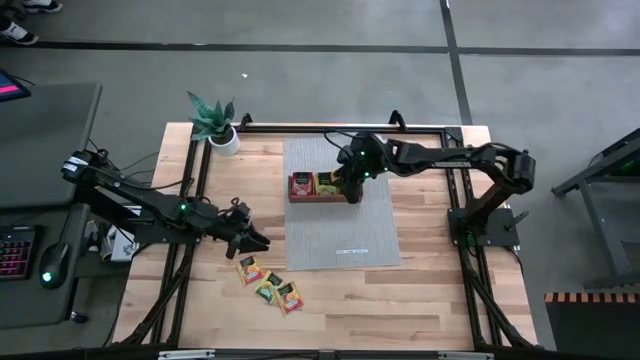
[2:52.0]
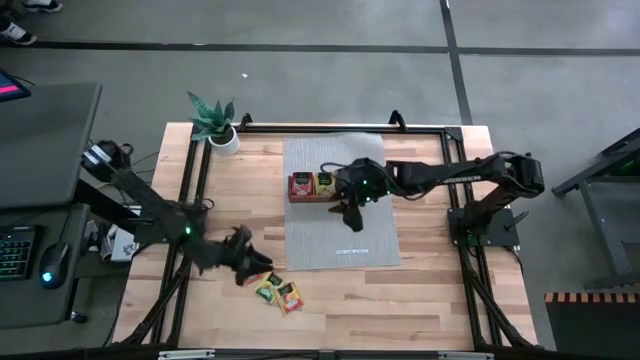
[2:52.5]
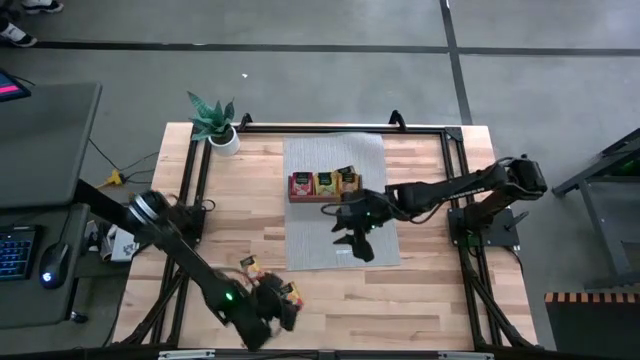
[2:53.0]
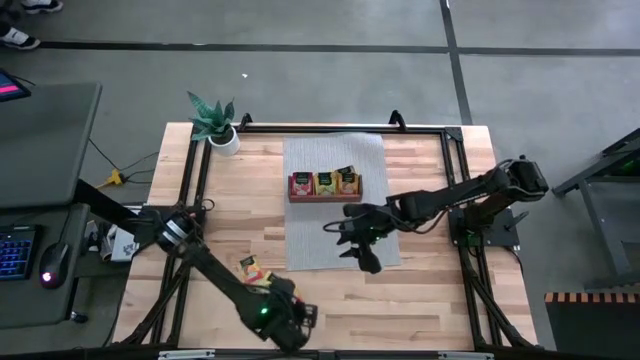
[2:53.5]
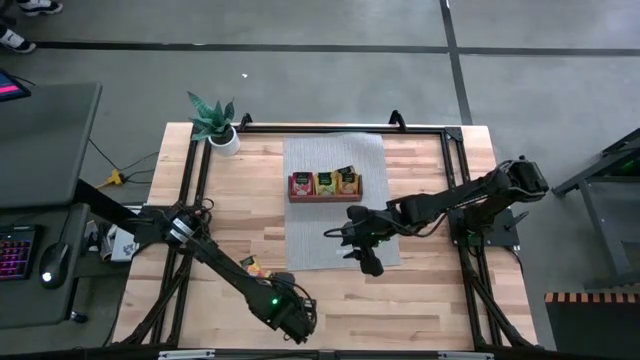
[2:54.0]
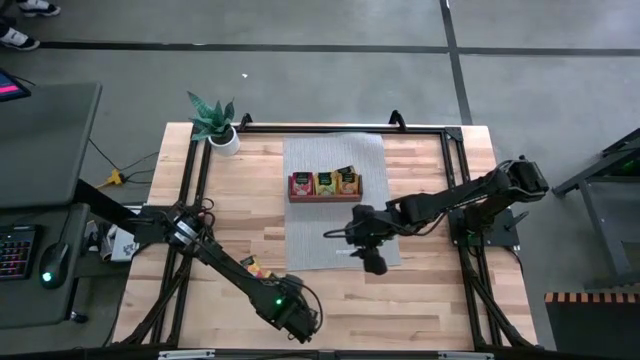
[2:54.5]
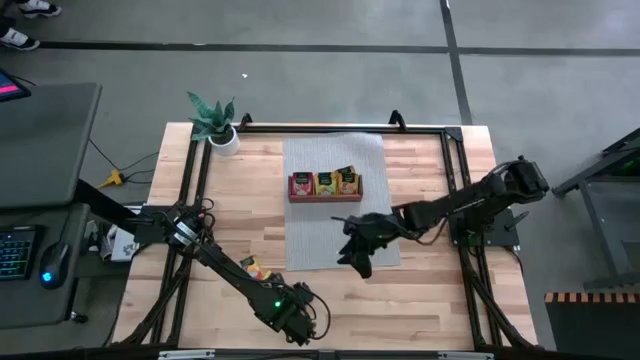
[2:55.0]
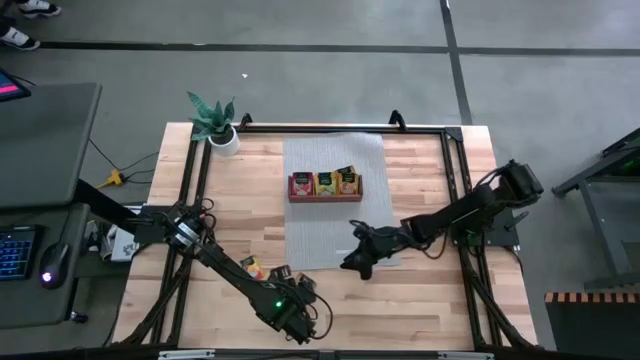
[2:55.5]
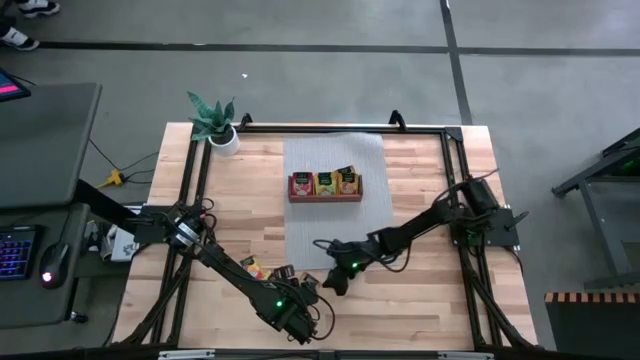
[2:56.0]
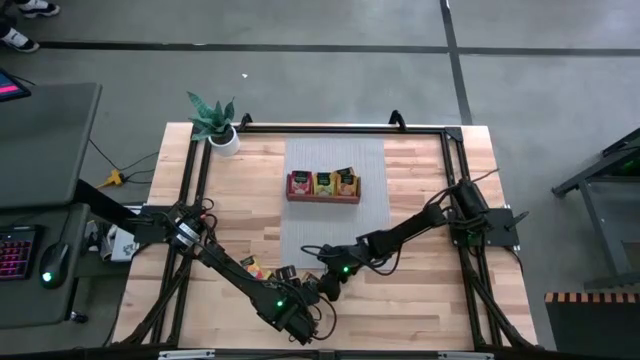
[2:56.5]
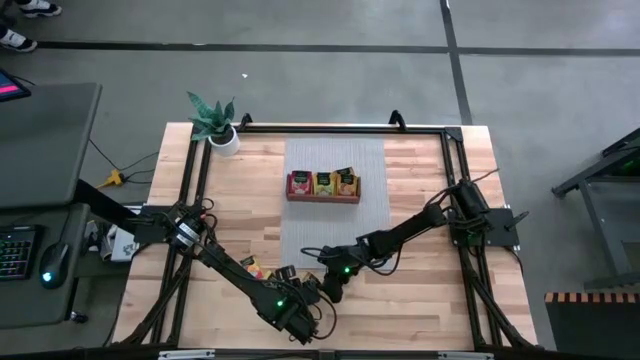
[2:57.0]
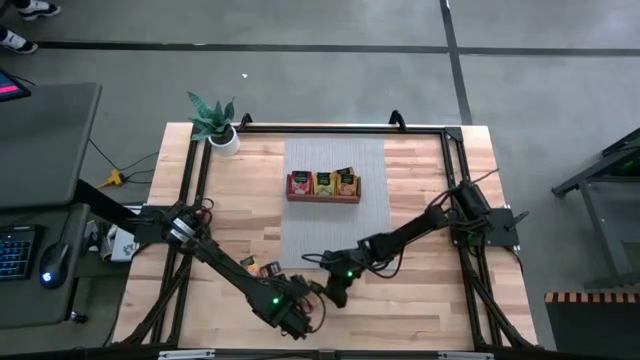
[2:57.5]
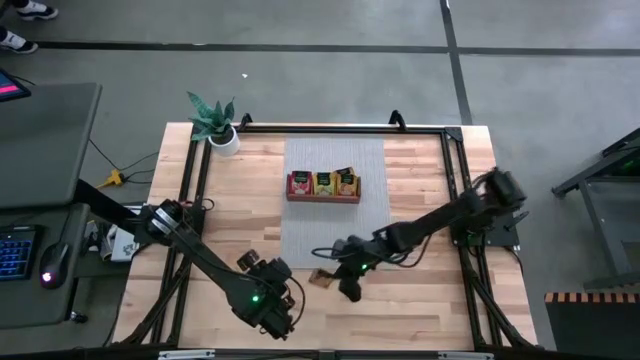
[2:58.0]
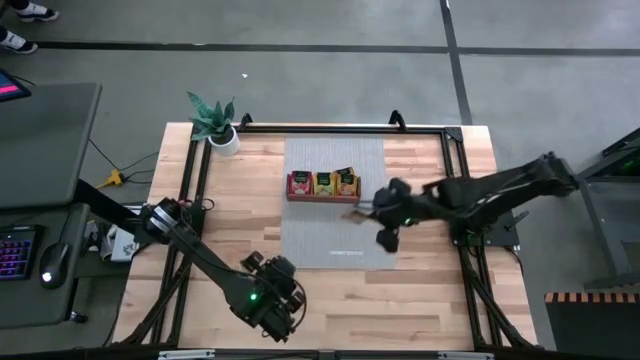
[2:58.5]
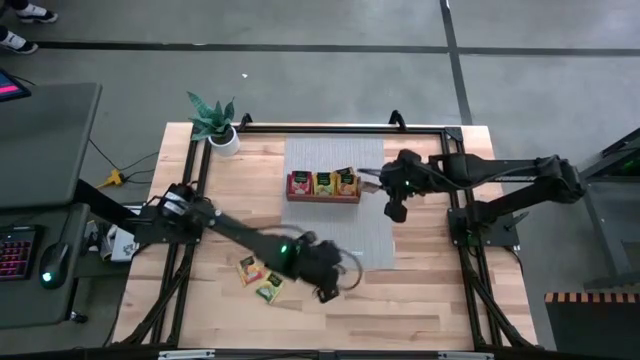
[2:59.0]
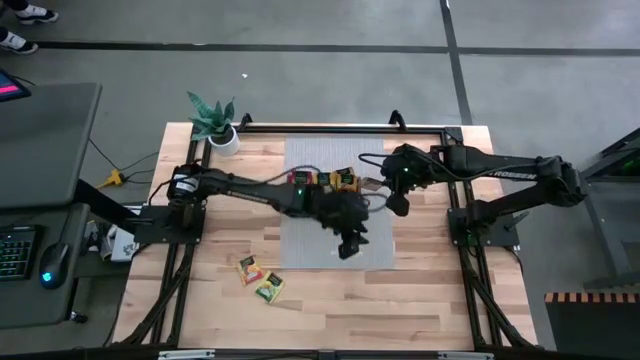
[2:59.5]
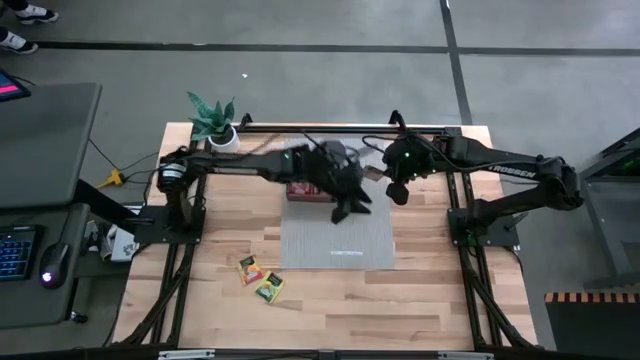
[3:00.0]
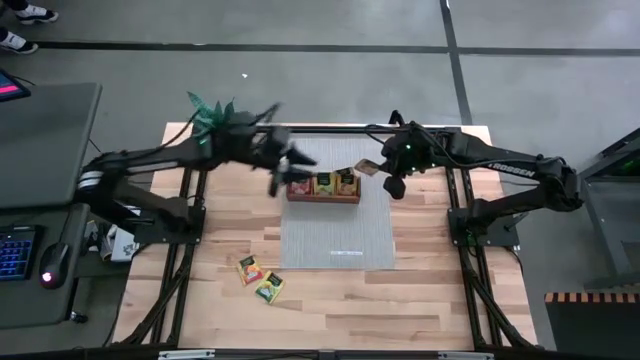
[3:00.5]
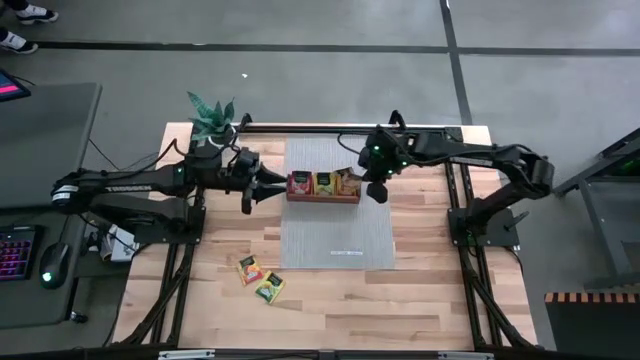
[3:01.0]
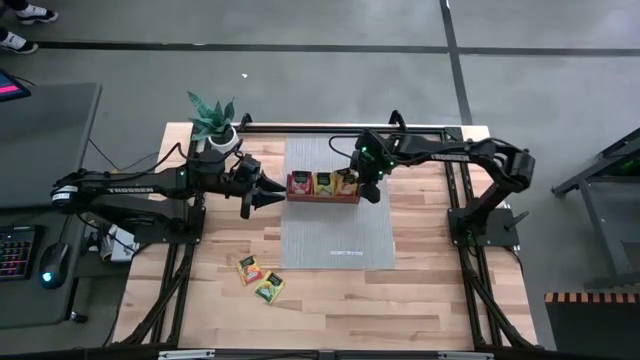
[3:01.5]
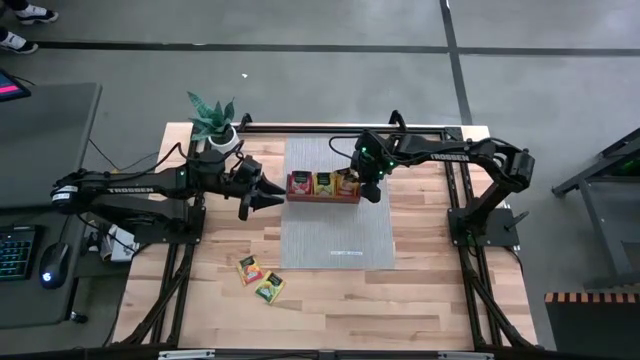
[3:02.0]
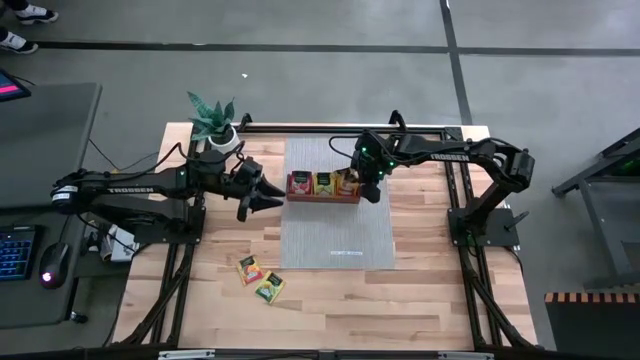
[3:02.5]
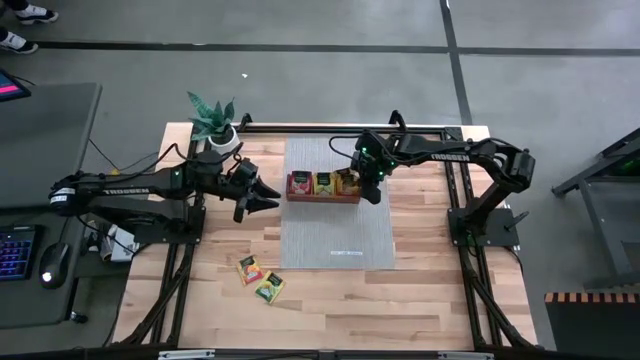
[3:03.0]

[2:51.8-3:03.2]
Task: Pick & Place Tea
Put the orange tea bag into the right section of the wooden organizer

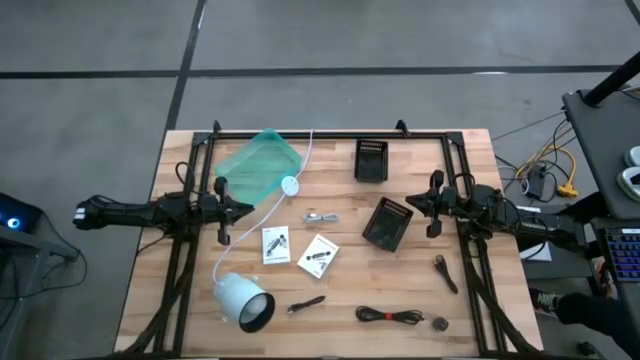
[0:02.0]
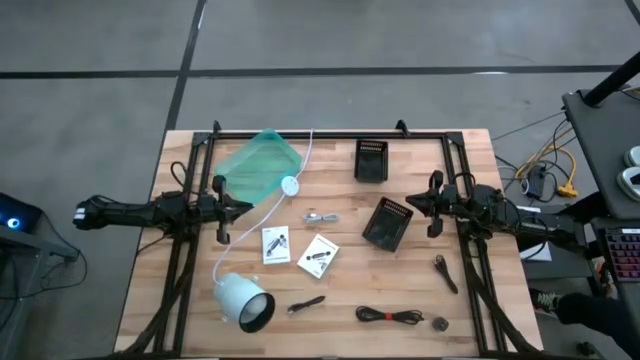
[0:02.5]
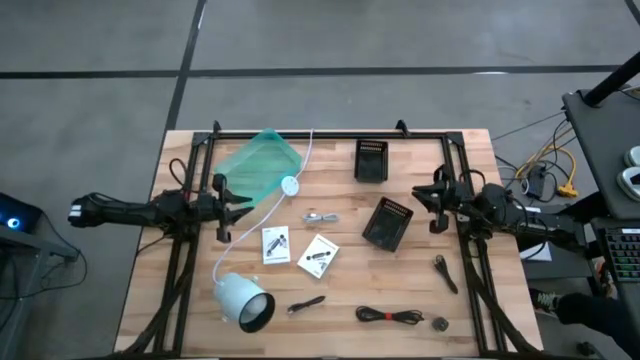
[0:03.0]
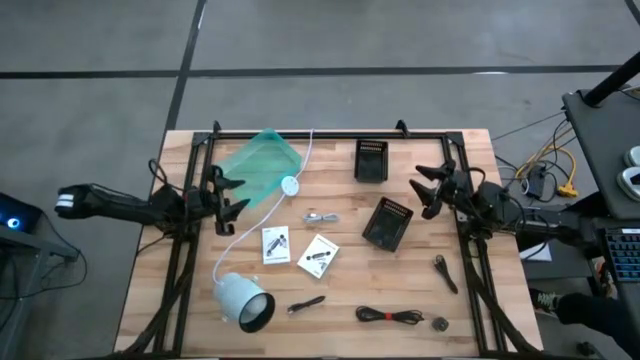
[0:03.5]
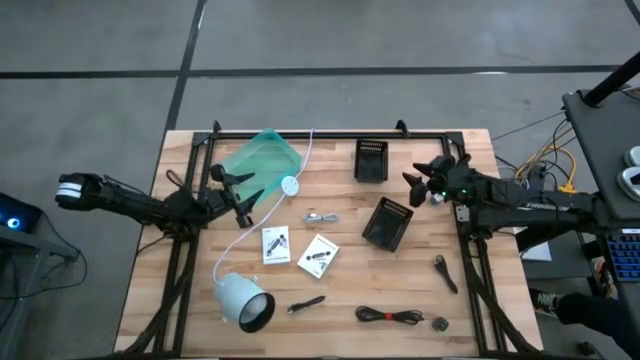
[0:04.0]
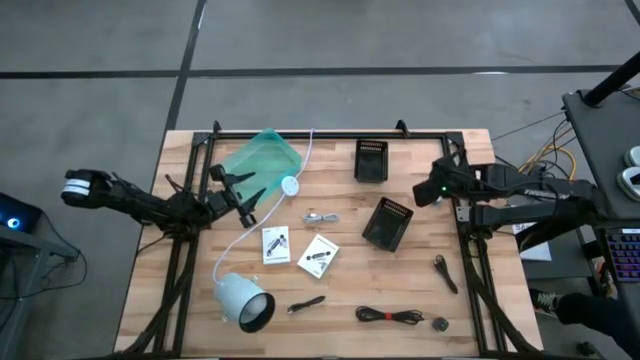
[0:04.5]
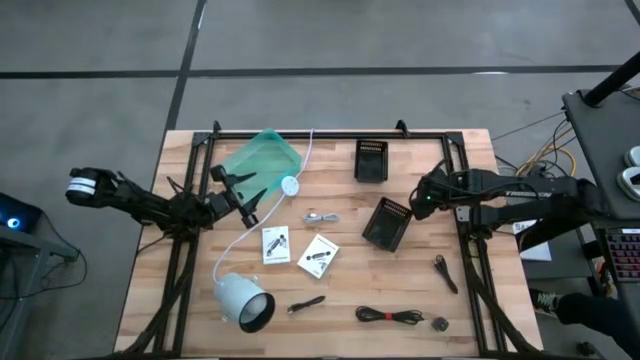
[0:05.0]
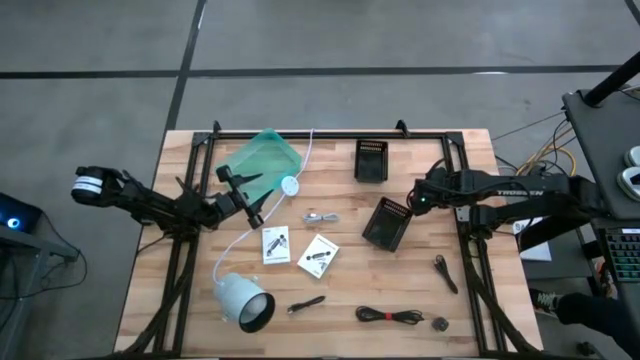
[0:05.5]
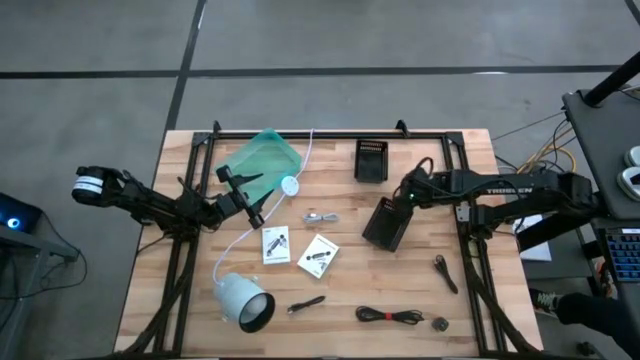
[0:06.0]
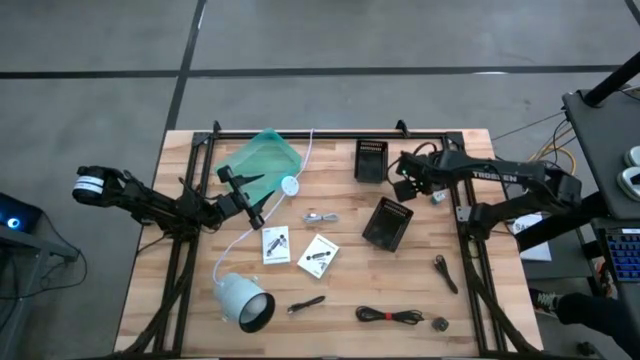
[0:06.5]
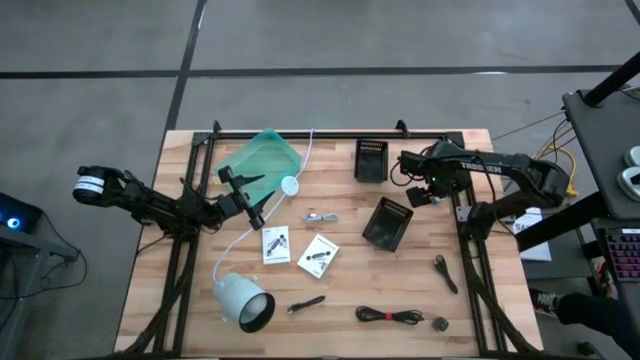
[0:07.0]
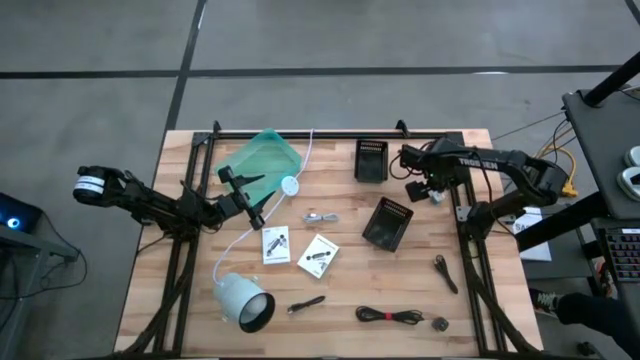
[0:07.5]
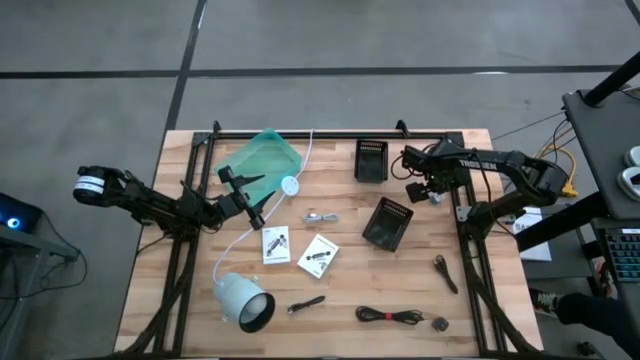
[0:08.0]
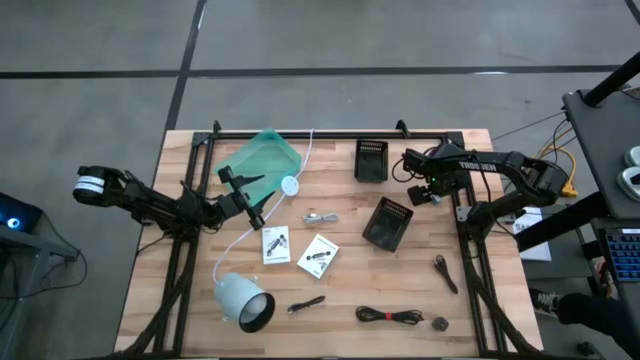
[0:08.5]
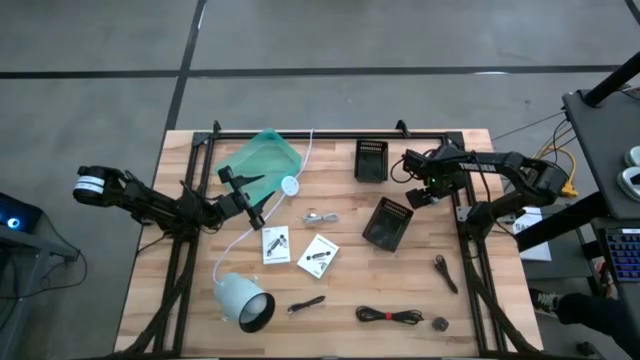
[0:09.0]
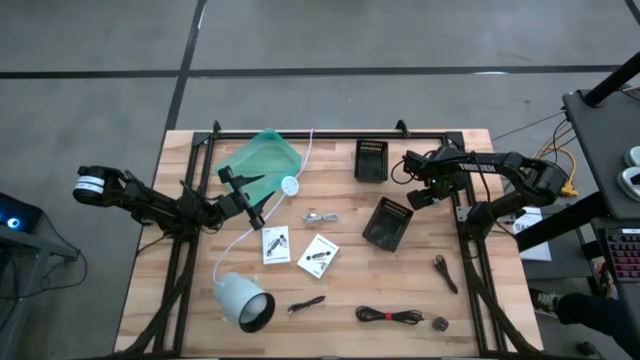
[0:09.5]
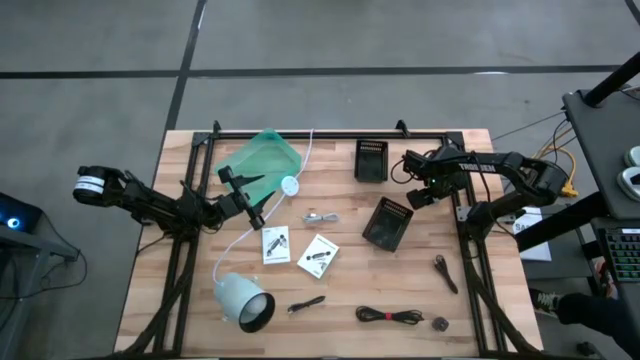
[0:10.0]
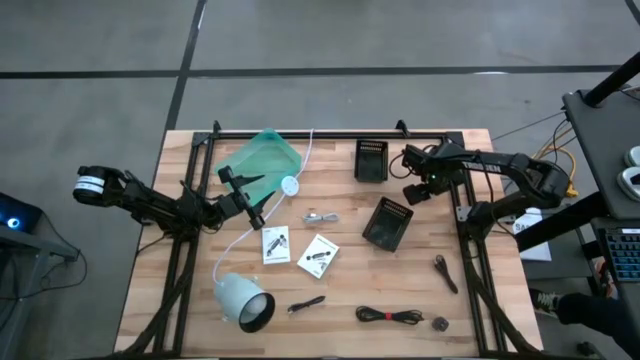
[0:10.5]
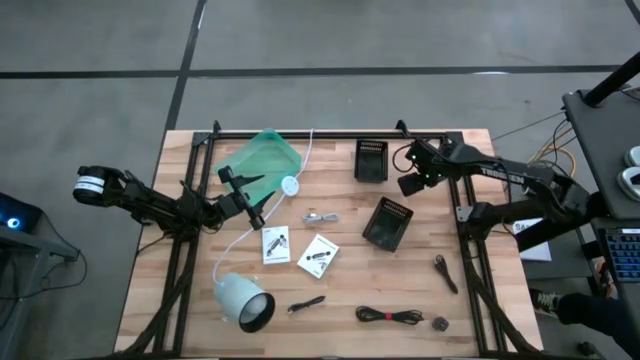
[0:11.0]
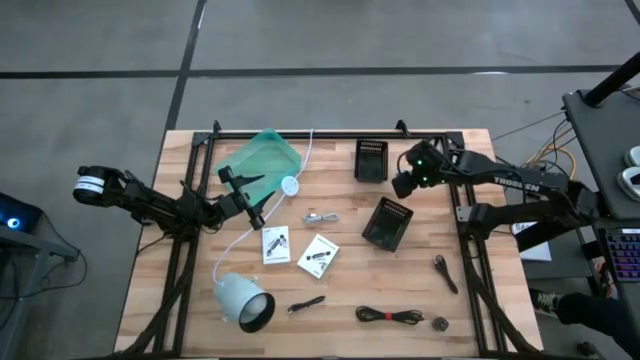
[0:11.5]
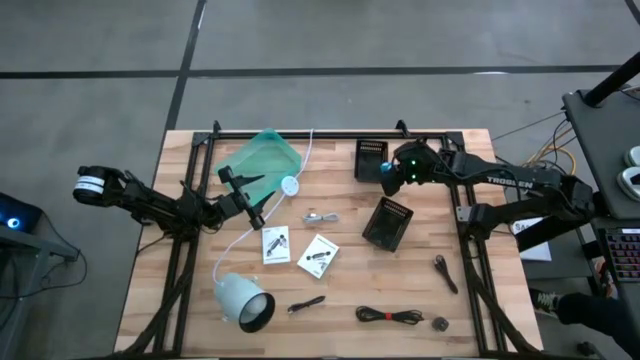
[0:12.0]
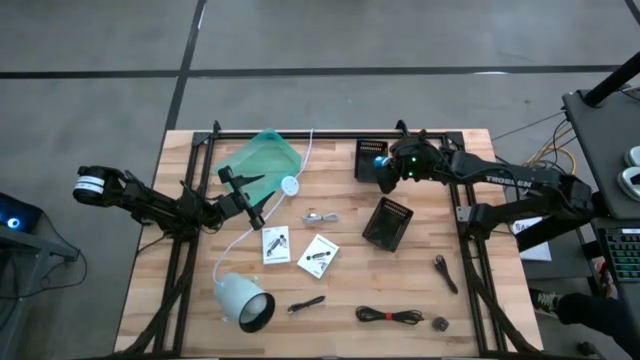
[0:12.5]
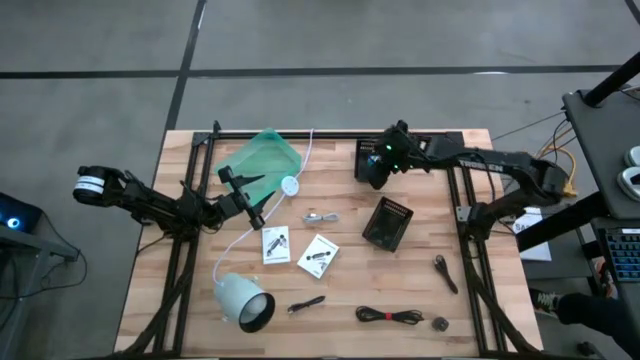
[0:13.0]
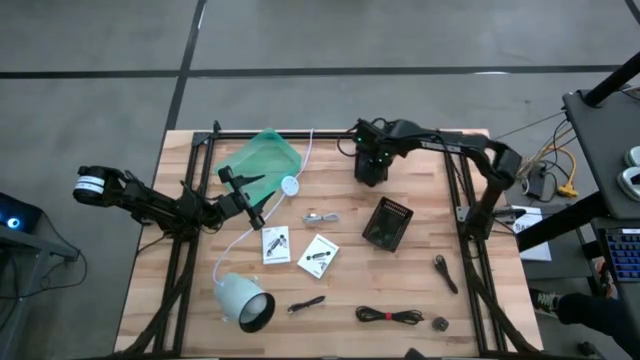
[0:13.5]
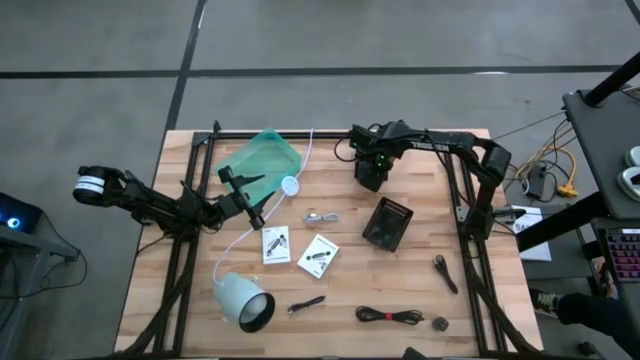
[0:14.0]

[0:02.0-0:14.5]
Task: Pick and place items into bin
Put the blue charger adapter into the top black bin
